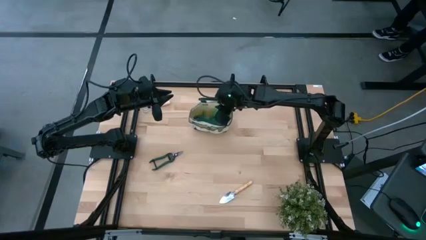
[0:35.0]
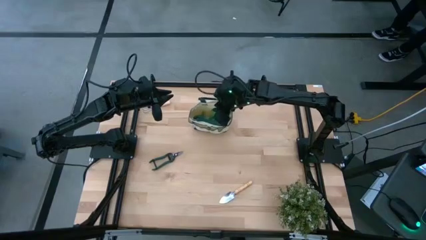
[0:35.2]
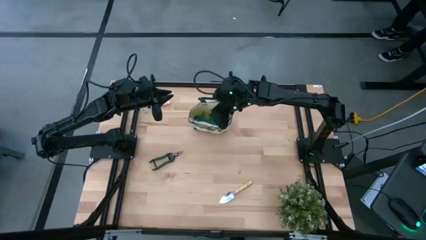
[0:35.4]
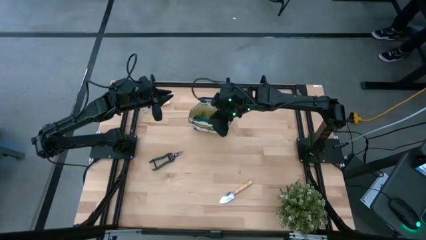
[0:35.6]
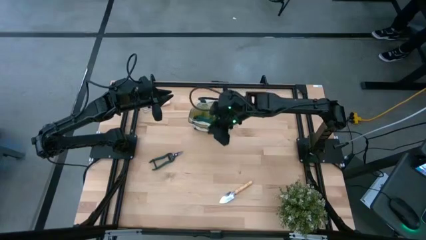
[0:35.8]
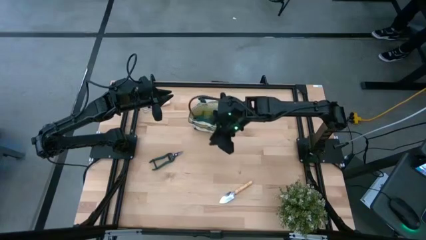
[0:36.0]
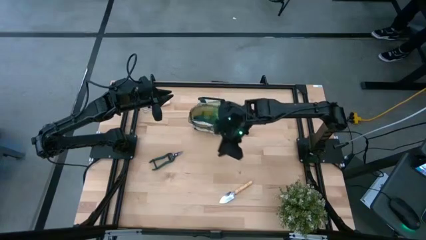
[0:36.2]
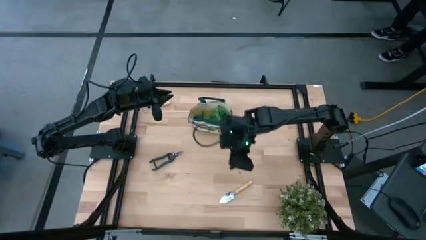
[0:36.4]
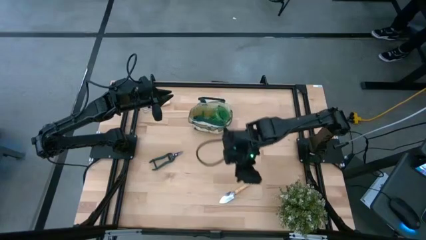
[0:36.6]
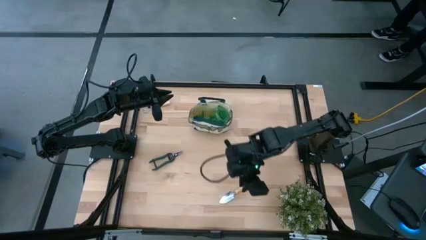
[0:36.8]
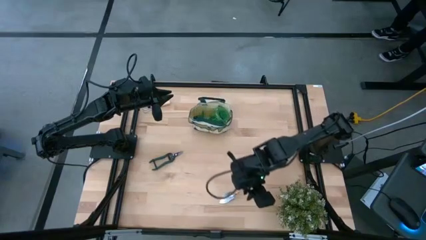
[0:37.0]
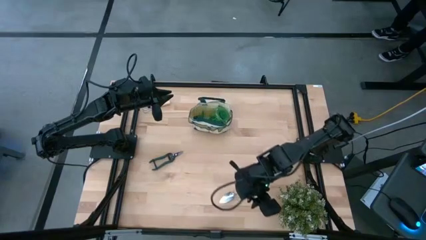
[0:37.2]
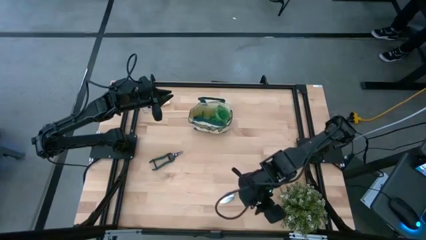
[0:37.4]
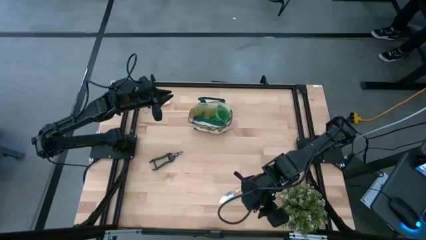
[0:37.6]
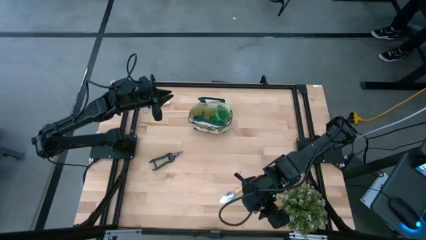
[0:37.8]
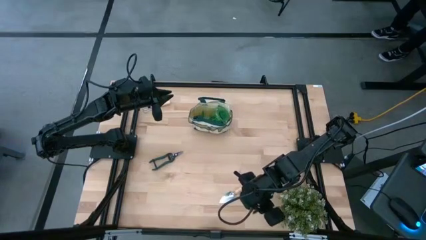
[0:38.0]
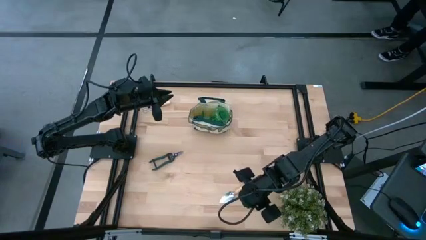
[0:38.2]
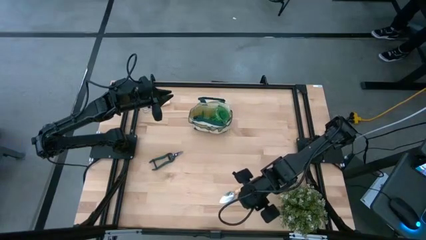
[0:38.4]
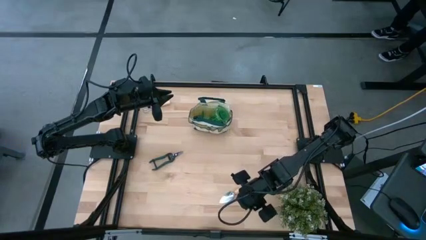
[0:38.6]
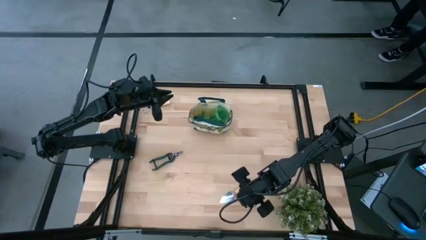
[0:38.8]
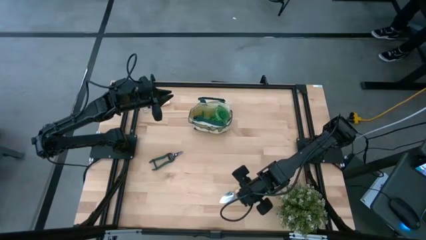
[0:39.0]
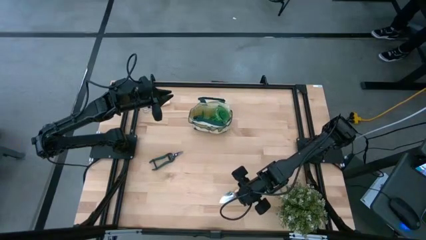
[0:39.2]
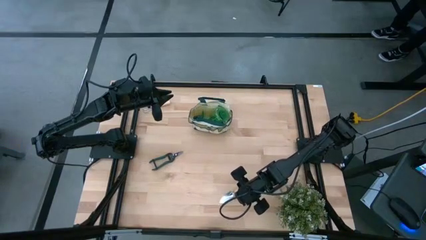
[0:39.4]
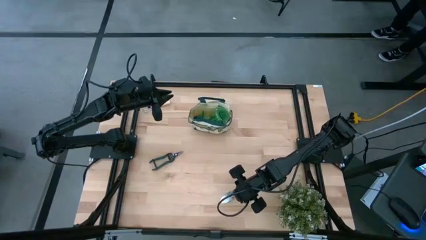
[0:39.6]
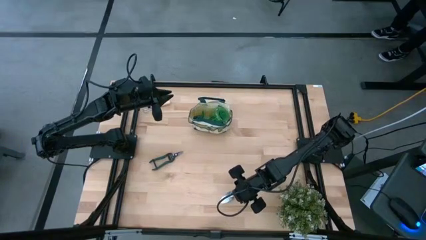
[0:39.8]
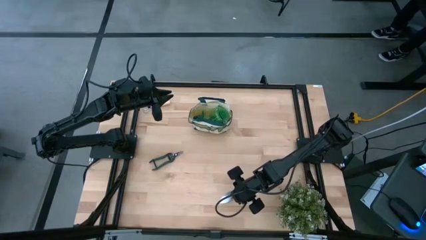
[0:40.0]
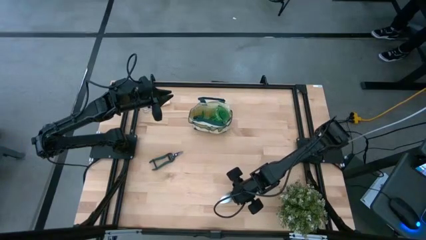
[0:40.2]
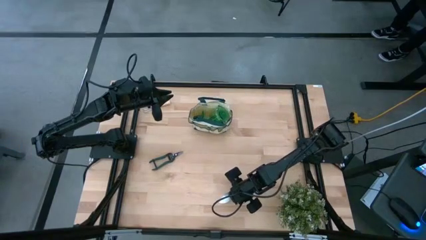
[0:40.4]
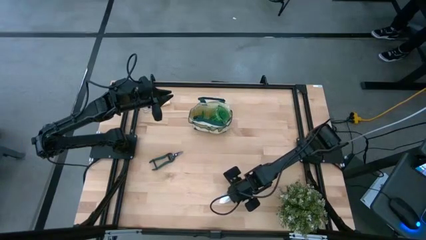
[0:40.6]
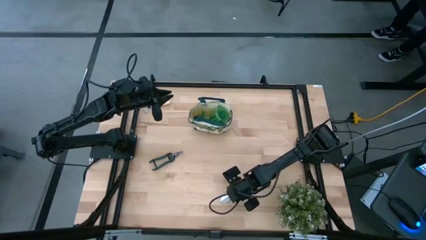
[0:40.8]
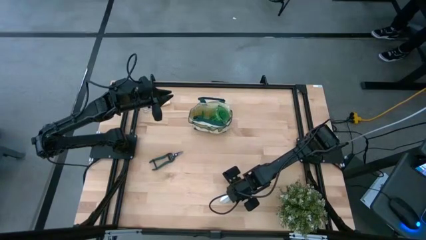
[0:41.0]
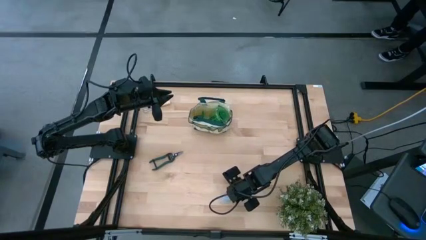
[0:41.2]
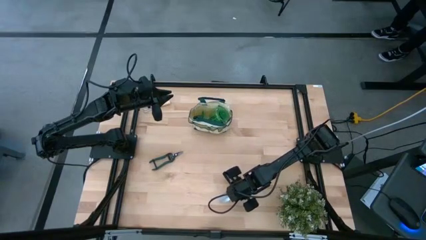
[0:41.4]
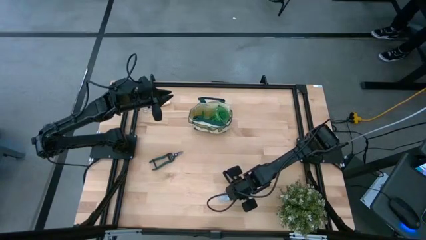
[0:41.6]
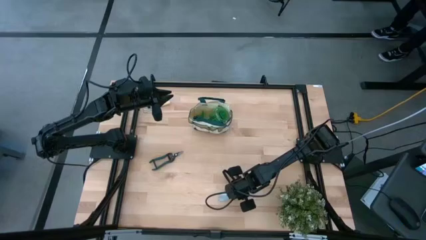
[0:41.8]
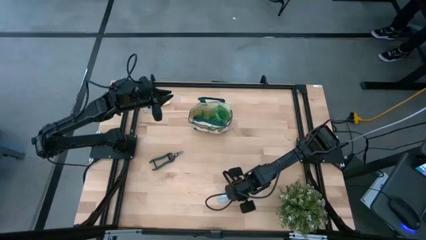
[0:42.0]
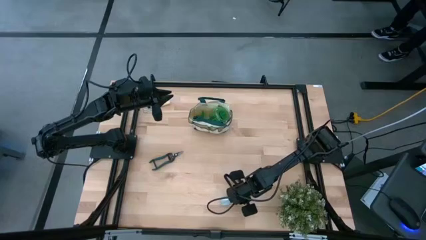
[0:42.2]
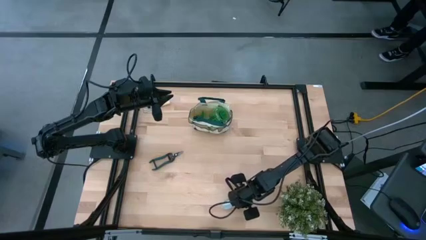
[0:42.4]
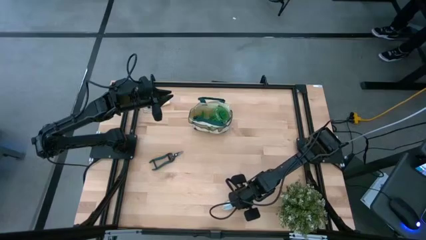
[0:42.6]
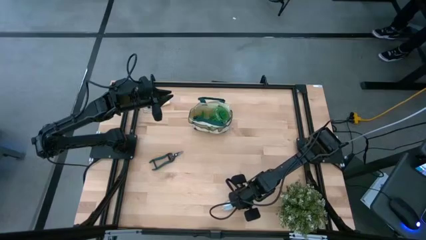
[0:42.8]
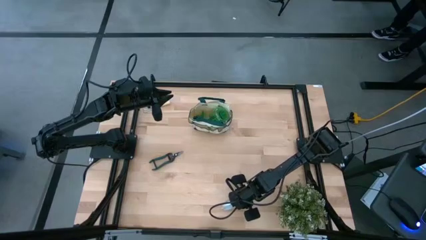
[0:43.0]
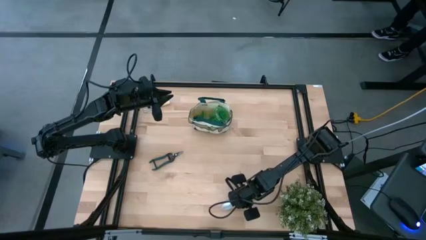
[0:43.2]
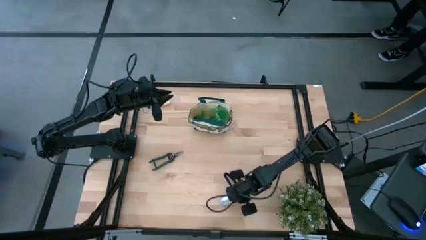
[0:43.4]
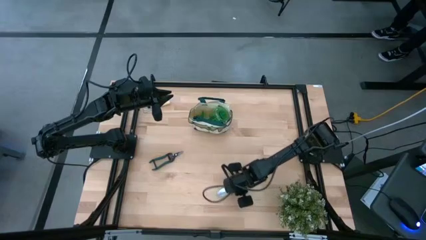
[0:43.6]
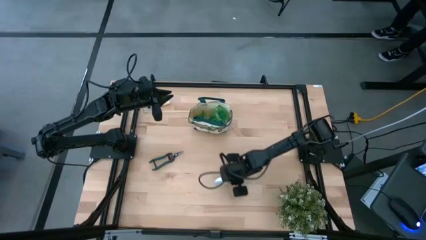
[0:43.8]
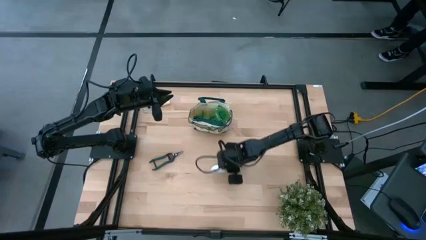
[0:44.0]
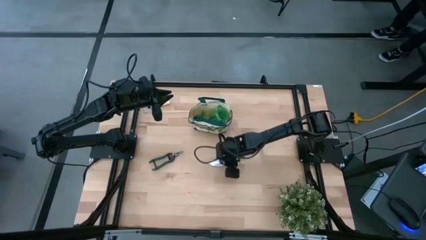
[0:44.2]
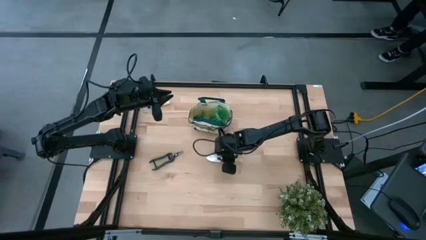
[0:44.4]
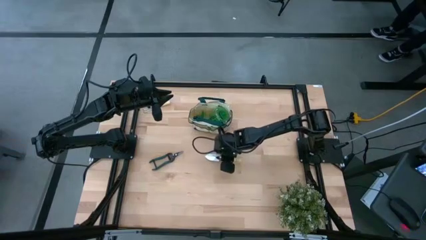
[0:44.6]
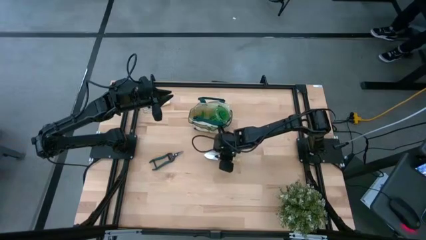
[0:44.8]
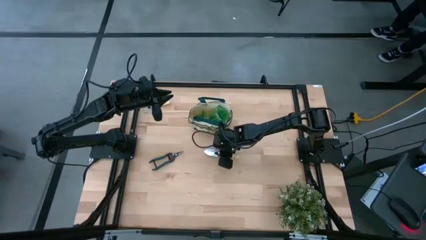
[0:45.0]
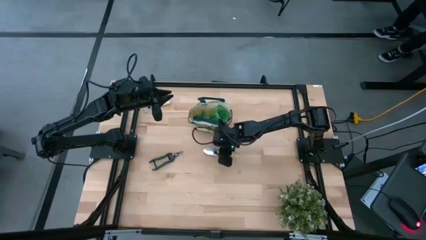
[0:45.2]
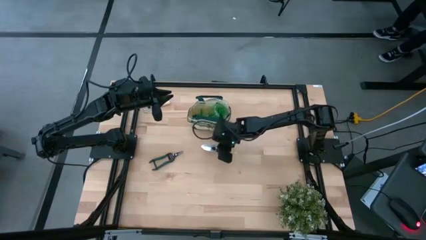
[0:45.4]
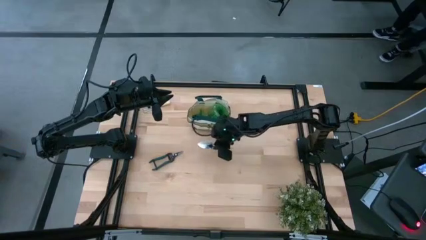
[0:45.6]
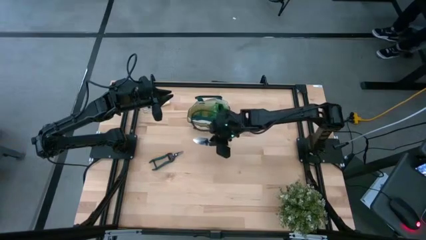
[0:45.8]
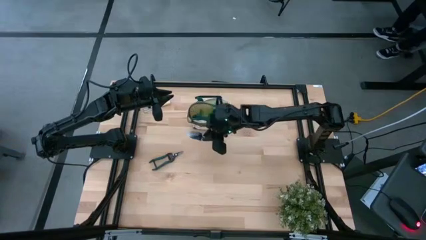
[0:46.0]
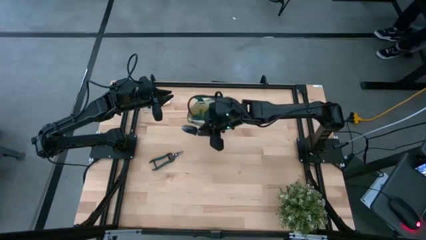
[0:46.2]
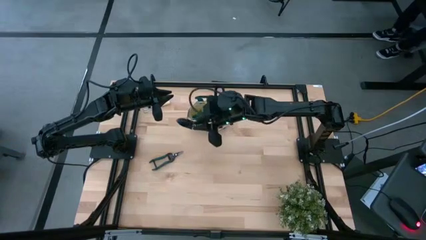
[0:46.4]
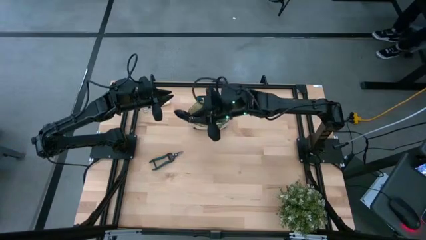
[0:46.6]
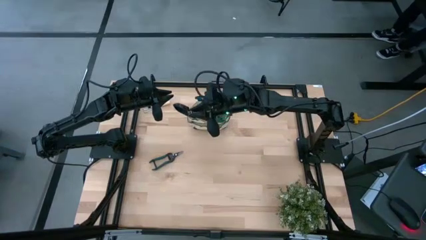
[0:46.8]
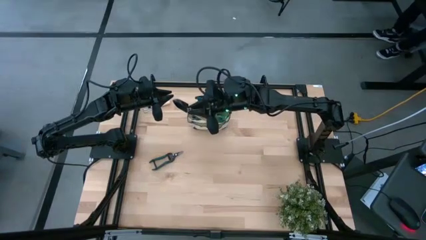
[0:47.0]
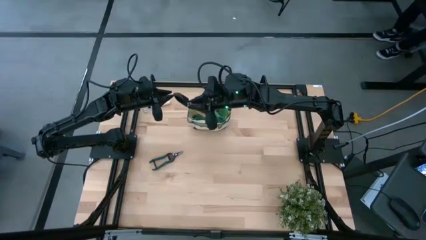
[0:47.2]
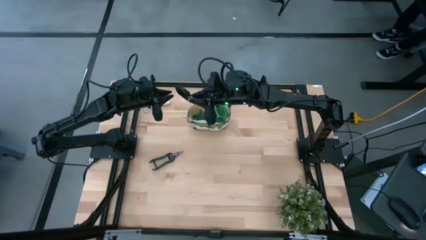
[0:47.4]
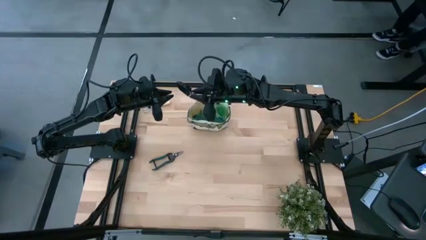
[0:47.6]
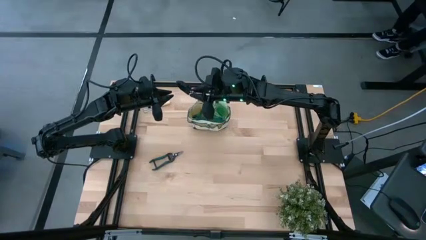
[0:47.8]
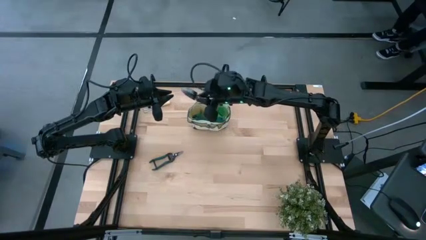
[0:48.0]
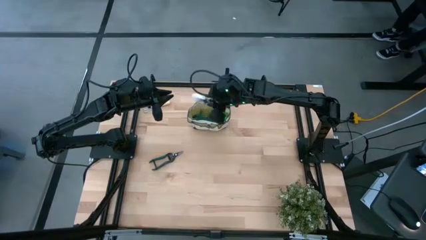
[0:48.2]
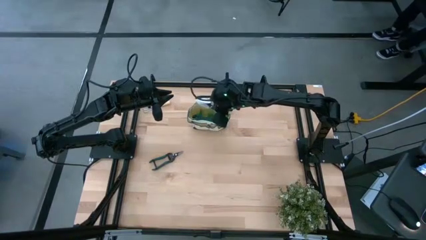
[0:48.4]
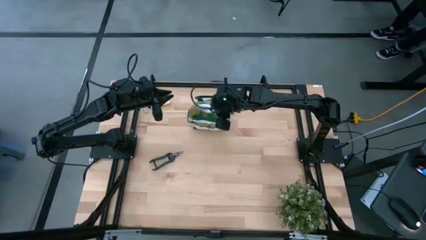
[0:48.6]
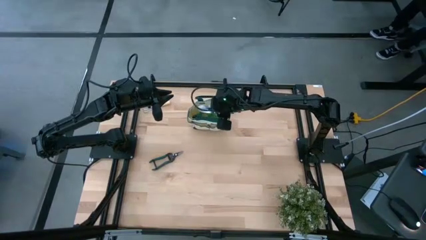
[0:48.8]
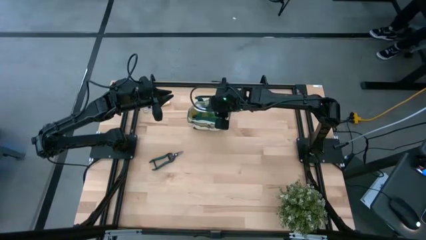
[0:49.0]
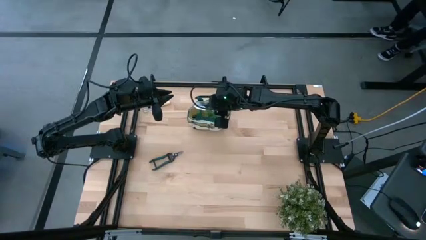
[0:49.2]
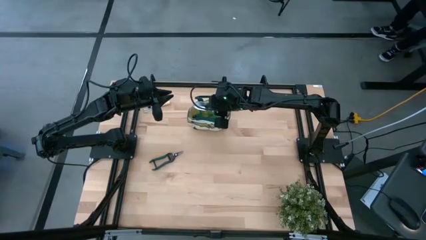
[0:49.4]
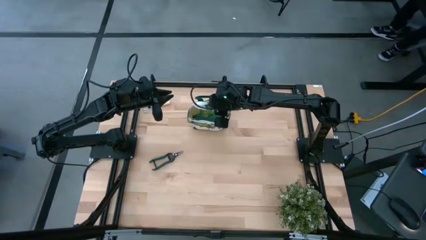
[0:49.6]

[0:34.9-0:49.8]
Task: Pick & Place Garden tools in Gardening bag
Put the brown trowel into the gardening bag

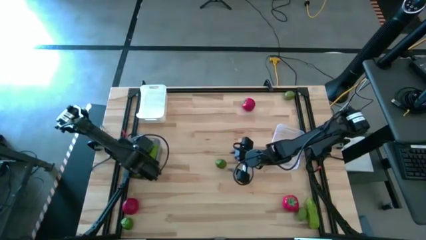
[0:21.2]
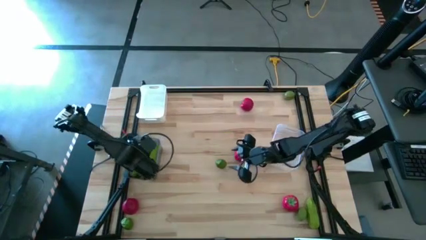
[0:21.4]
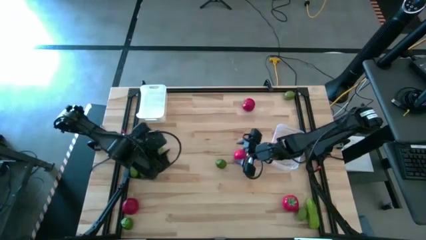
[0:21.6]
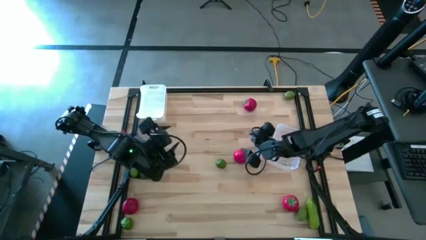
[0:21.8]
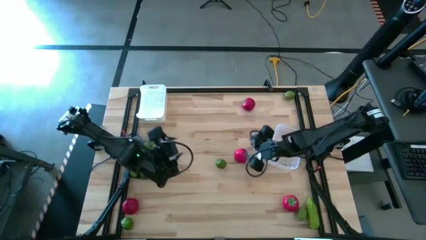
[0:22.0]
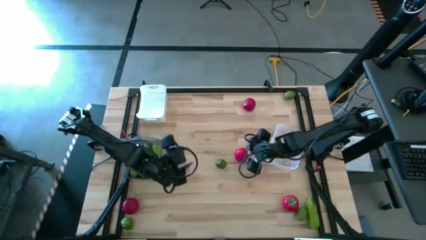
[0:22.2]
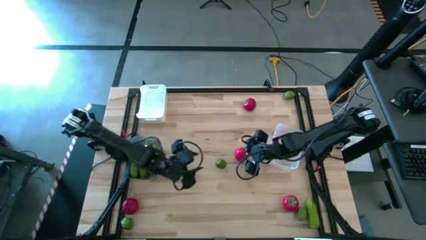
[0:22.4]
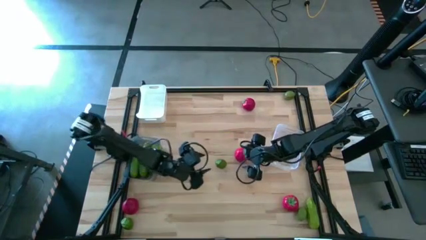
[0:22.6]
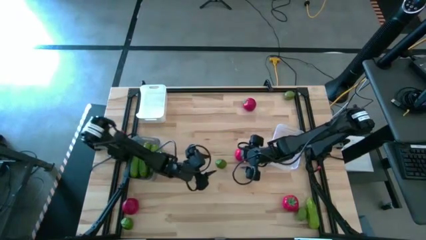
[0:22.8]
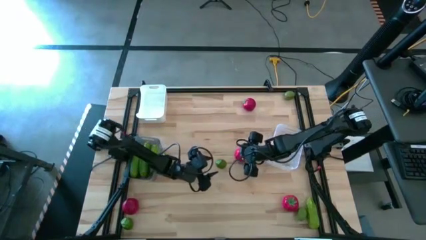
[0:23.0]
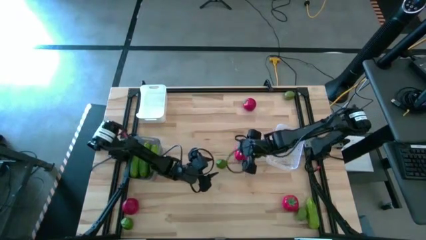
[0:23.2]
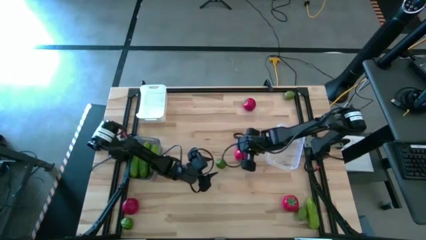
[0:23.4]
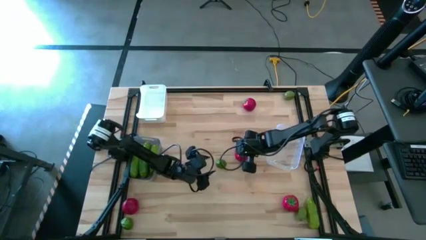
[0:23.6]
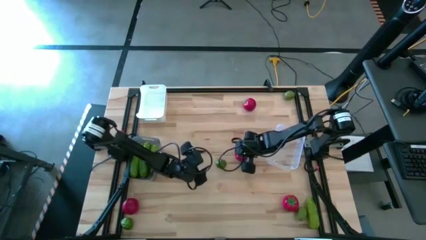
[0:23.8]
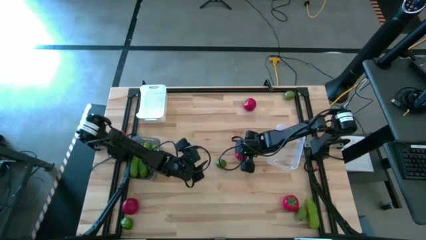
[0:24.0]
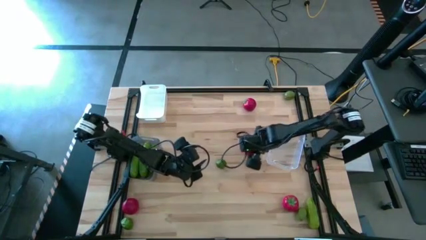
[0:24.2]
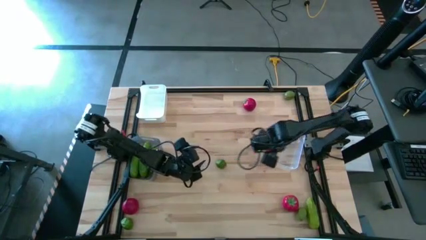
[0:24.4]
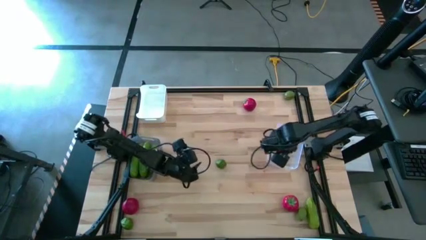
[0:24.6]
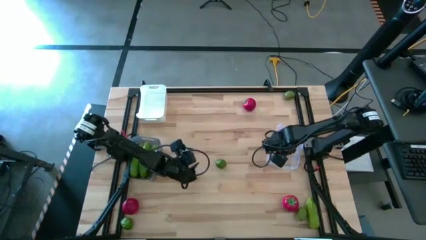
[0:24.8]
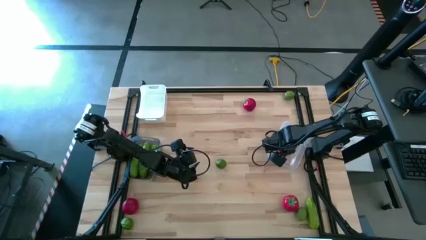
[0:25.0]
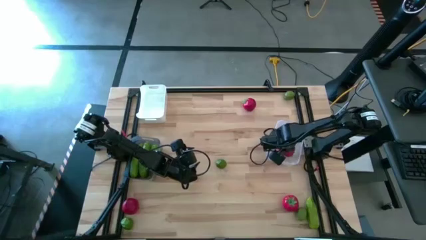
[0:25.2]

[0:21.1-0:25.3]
Task: Sort produce into baskets
Put the tomato into the transparent bin
